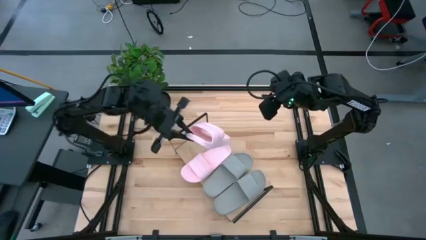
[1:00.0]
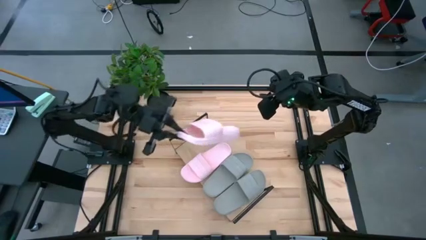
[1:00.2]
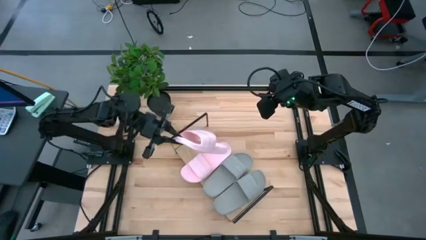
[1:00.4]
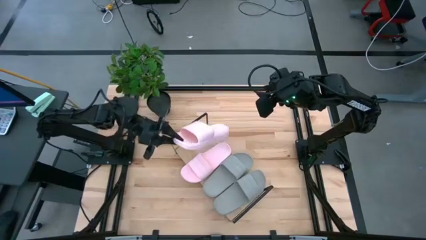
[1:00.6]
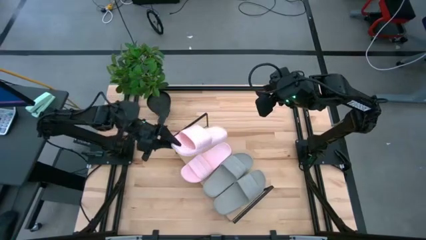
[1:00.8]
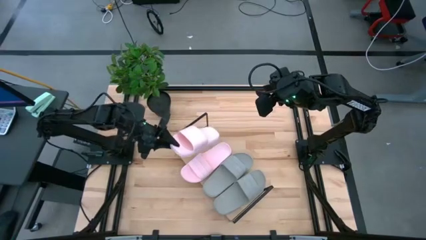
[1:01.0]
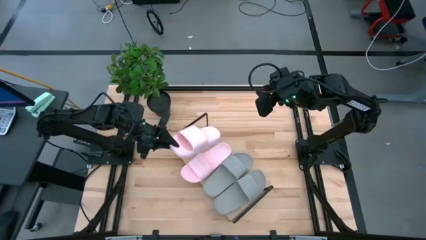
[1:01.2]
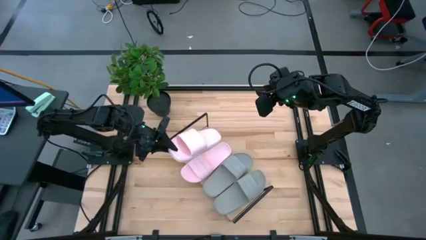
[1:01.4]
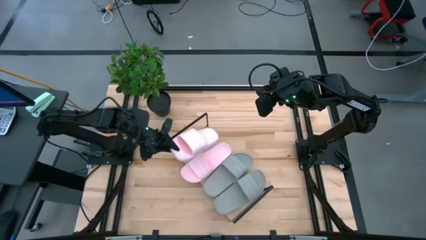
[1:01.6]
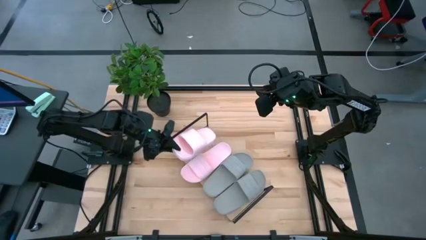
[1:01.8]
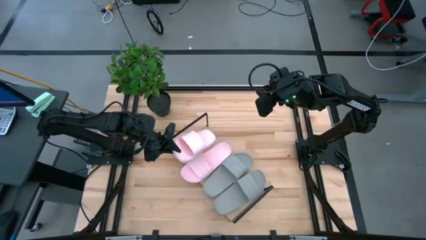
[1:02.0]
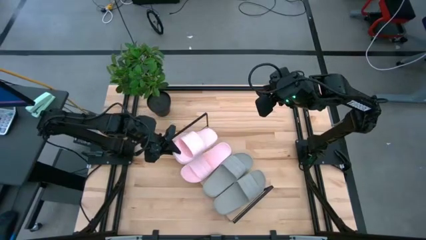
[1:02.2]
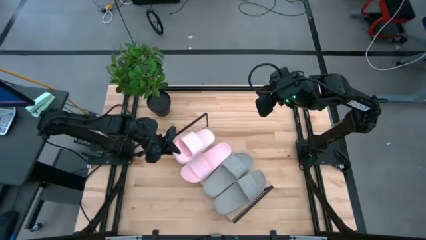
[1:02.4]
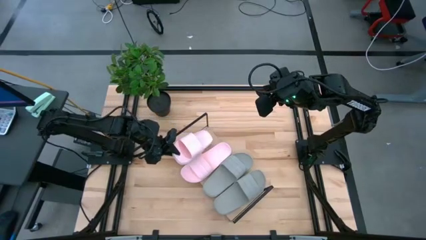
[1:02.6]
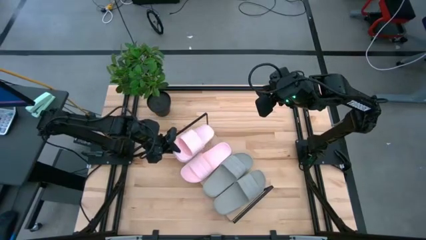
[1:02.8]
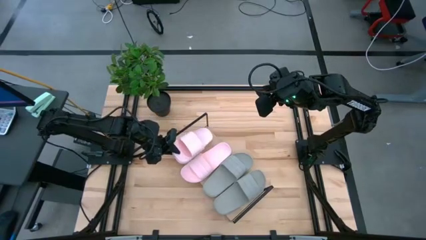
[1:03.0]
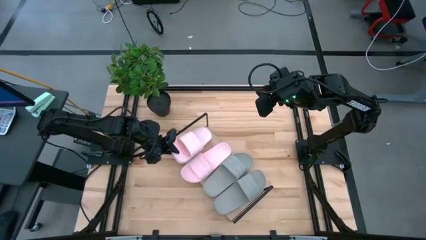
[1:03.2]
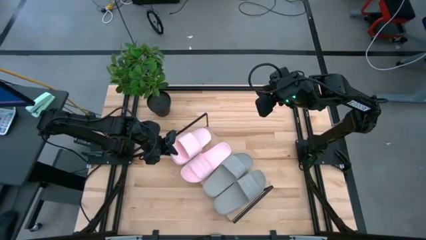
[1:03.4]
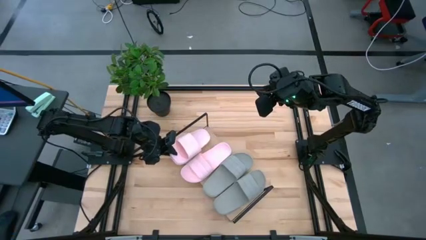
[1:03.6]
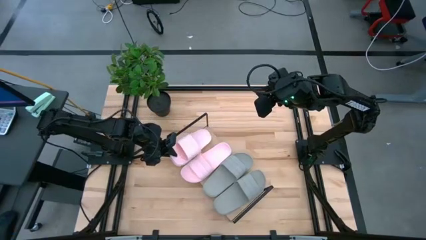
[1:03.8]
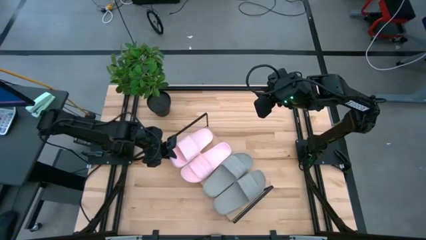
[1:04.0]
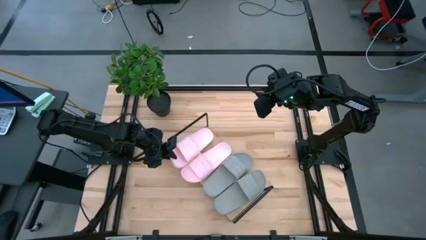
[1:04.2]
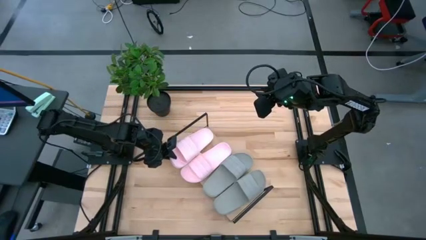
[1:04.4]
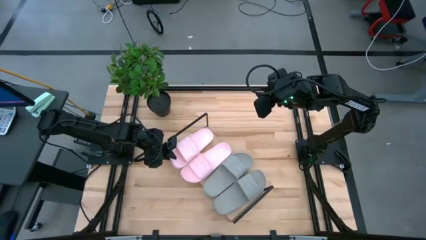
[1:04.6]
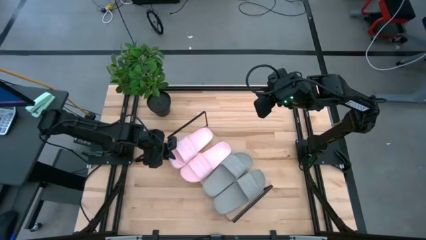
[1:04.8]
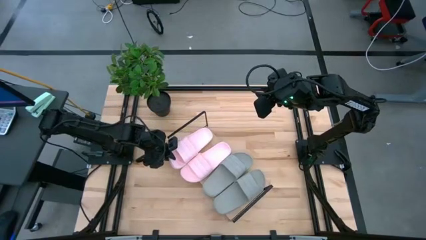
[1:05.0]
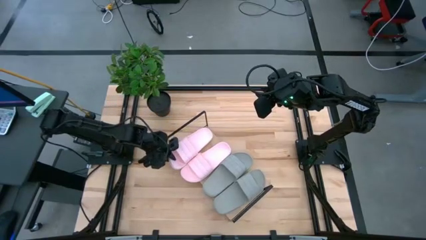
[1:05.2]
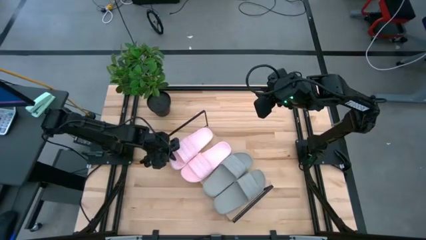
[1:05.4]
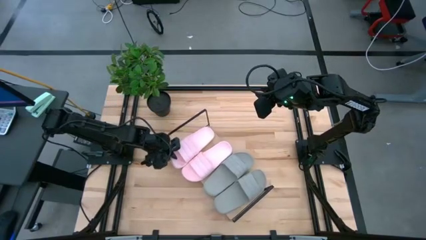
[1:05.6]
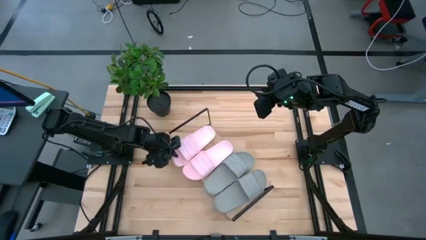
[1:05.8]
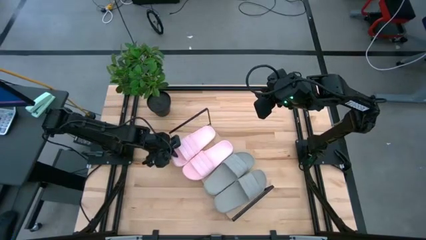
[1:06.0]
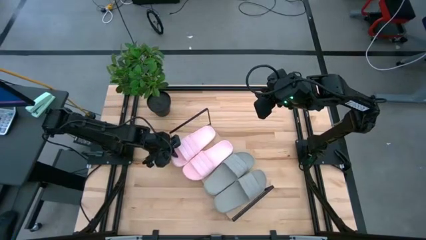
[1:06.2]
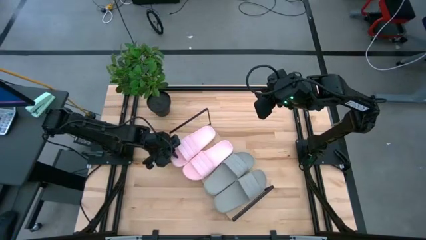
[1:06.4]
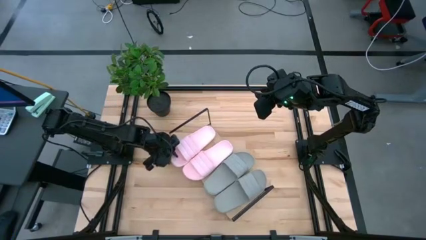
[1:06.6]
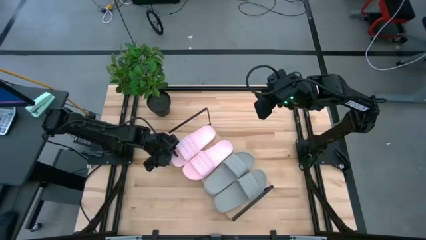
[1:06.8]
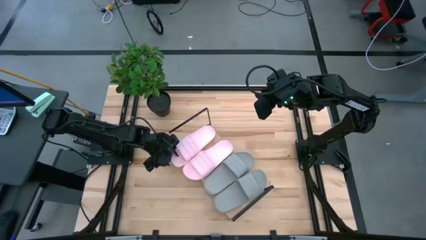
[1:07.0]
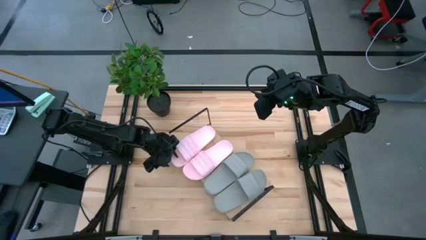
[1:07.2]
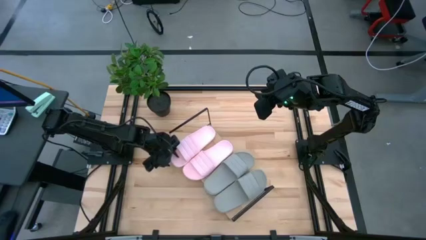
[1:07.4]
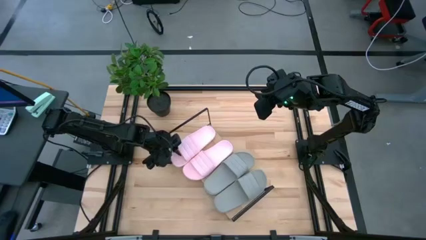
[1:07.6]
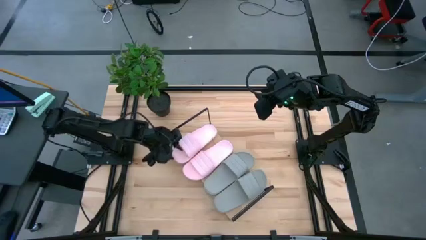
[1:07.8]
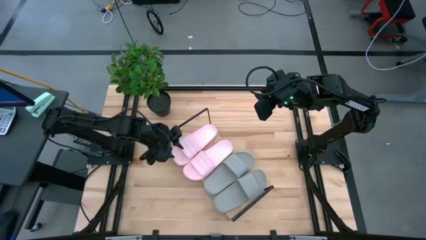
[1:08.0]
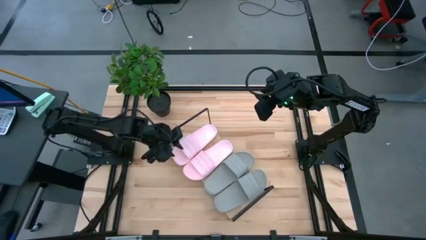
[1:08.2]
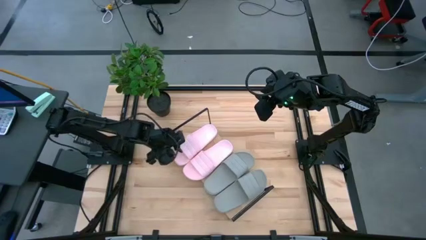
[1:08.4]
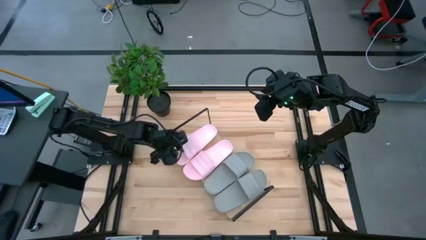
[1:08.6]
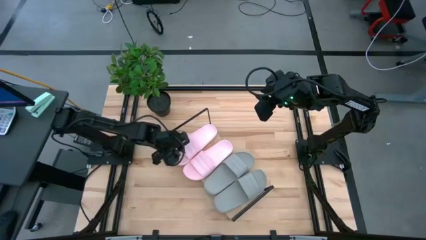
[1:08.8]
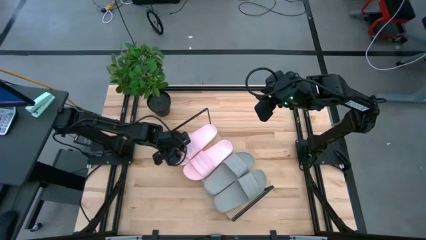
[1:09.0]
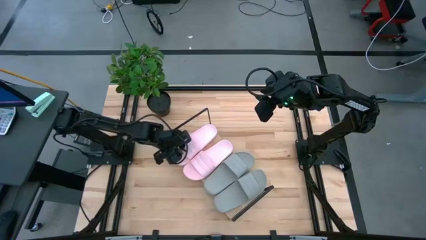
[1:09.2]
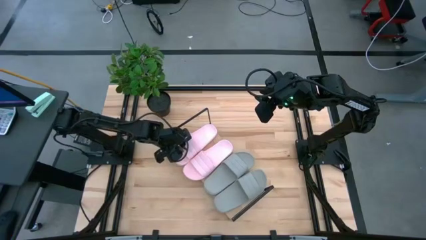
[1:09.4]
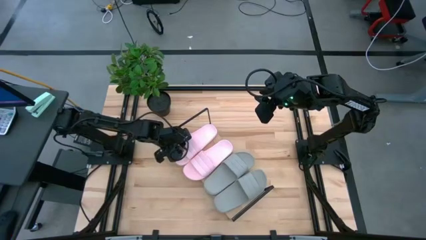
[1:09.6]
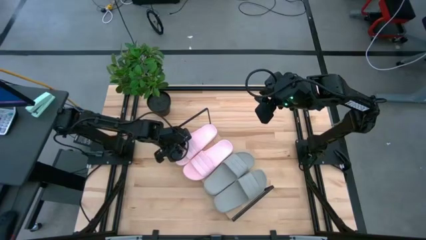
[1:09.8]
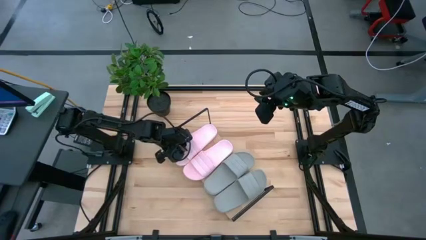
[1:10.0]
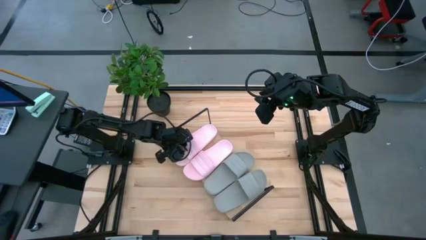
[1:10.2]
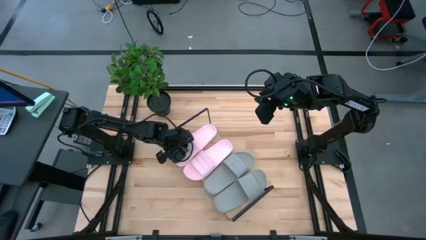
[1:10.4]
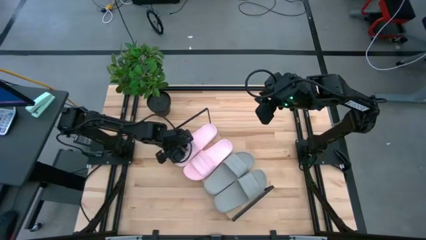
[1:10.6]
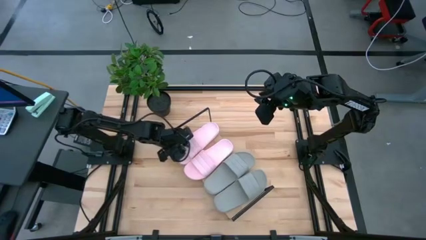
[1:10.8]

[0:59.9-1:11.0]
Task: Pick and place slides into the shelf
Put the pink slide on the shelf

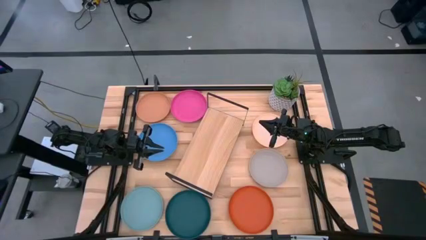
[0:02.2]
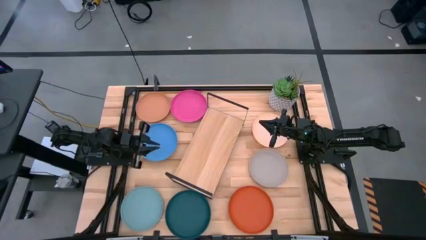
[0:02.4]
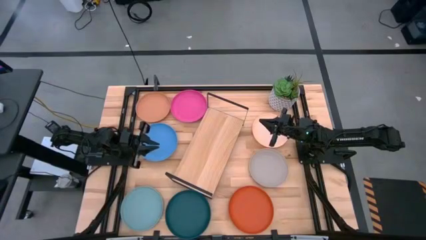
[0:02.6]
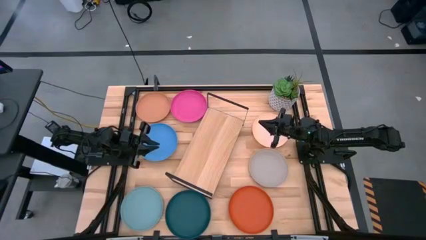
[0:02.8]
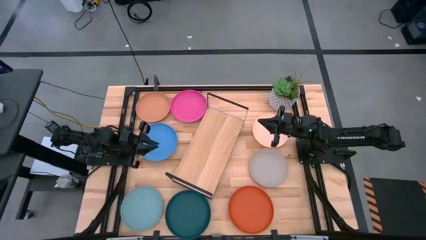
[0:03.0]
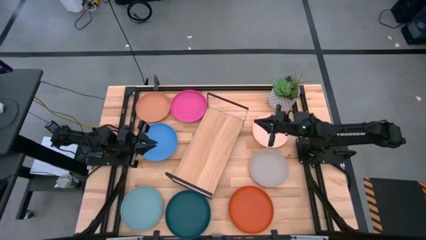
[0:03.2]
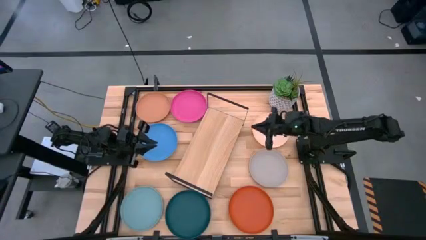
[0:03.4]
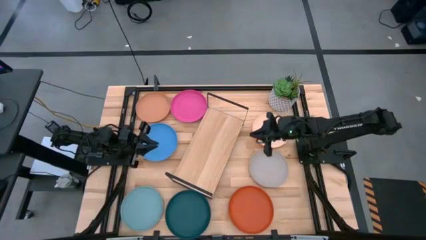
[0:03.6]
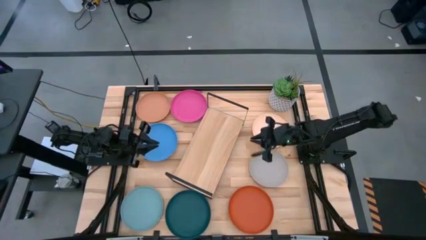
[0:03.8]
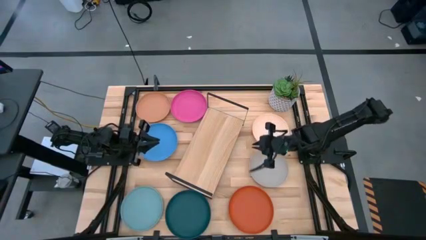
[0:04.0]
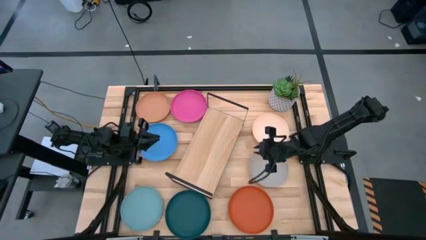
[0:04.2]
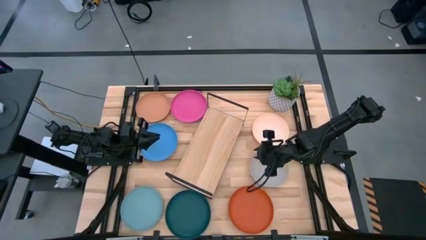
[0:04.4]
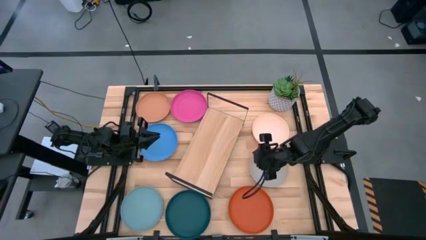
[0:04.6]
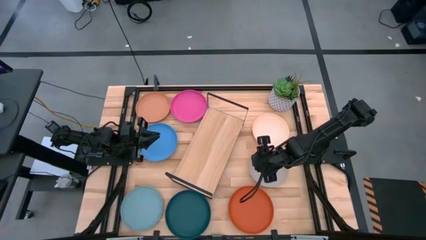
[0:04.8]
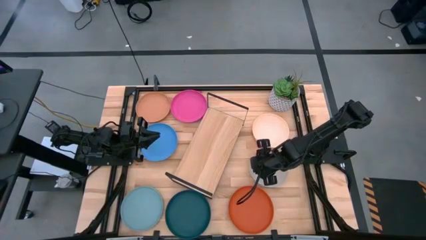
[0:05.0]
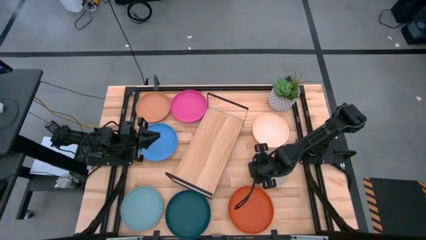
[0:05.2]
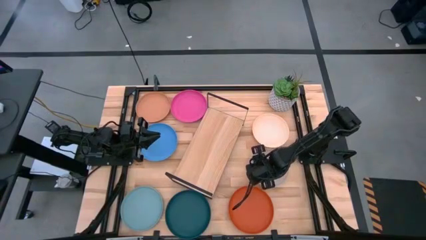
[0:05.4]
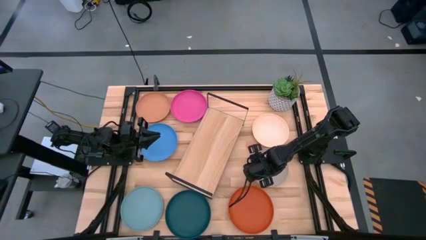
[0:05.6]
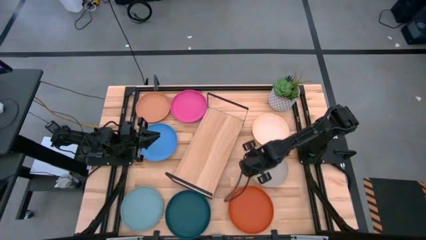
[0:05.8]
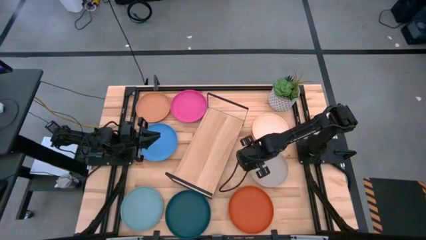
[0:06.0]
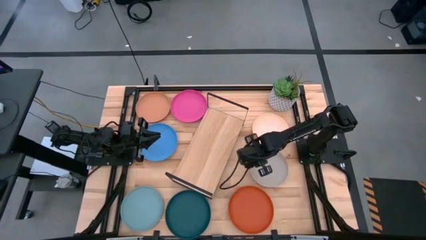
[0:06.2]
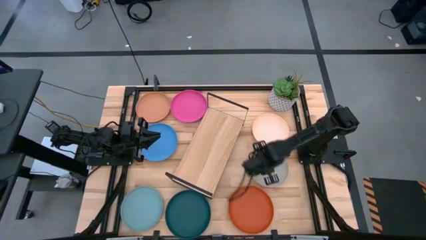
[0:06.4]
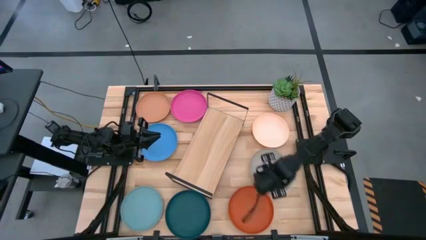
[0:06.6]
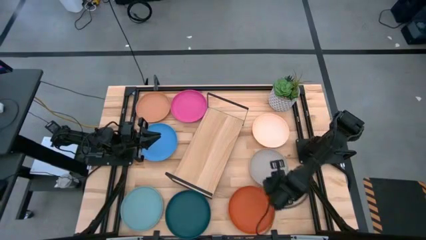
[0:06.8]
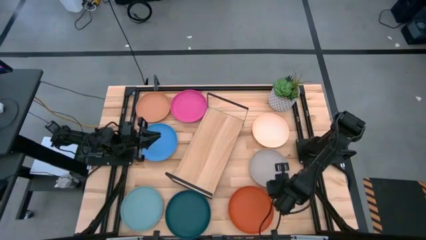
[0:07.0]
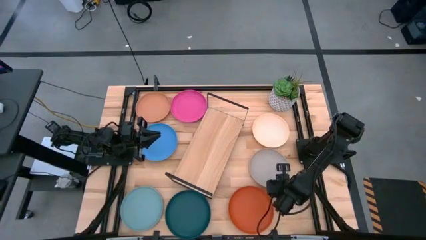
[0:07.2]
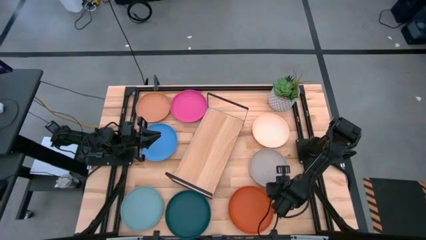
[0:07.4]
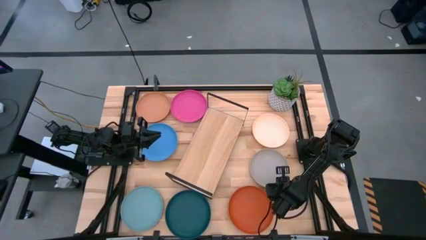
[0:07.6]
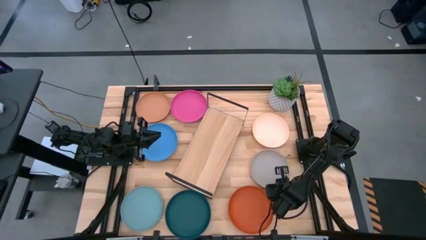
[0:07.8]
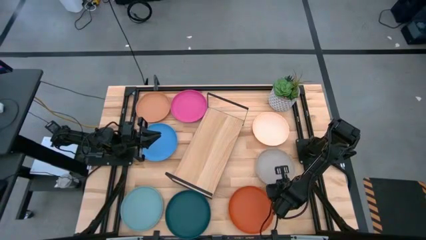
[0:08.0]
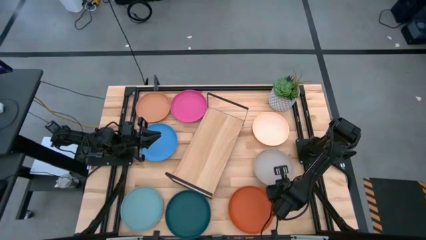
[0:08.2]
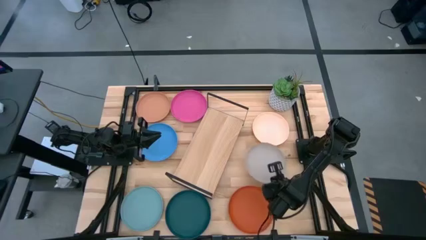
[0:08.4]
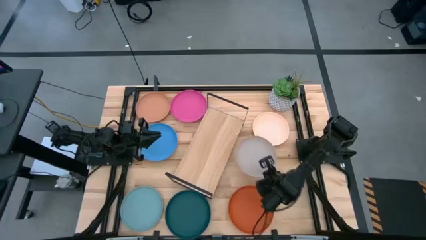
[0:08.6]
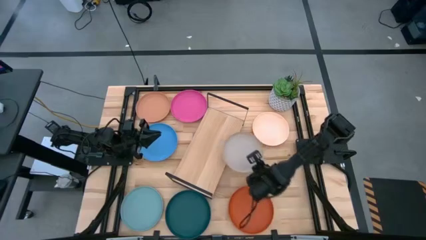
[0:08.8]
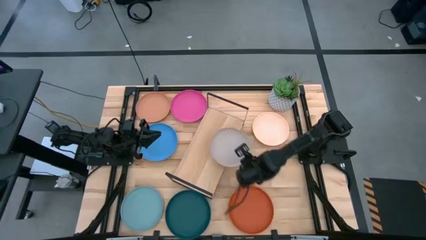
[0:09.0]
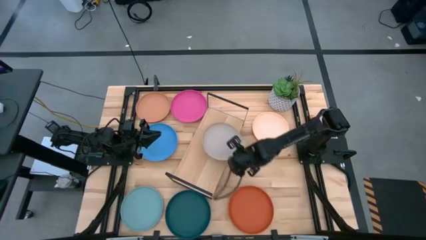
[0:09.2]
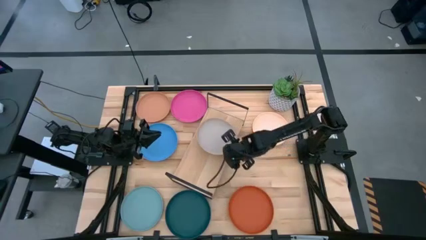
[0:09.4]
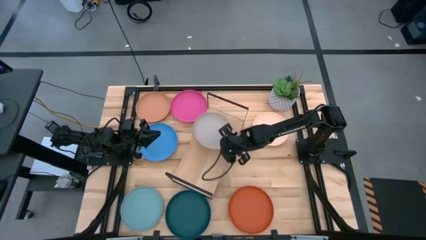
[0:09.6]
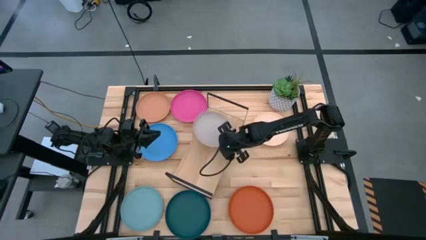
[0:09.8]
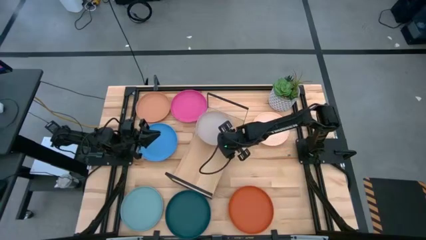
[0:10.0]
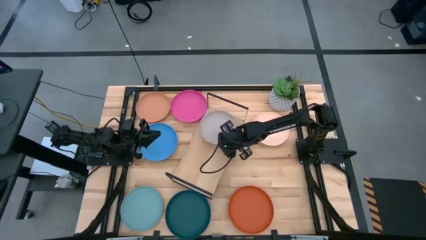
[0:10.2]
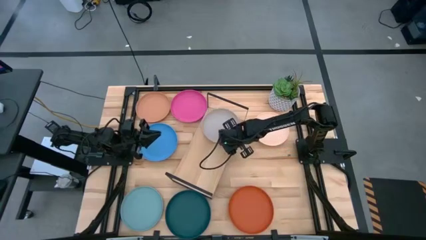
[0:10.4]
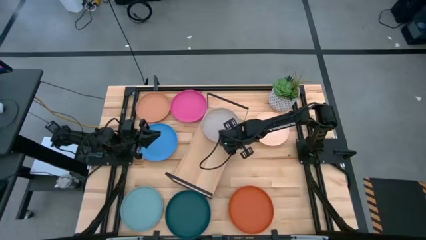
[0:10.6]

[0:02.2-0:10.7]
Task: Place and stack plates onto a shelf
Put the gray plate on the shelf
